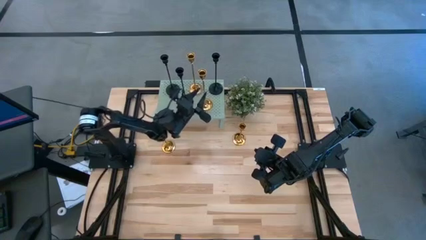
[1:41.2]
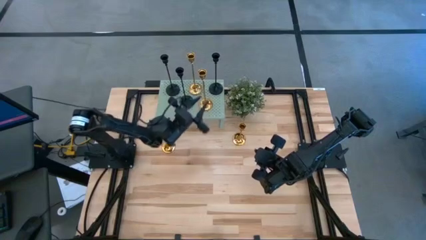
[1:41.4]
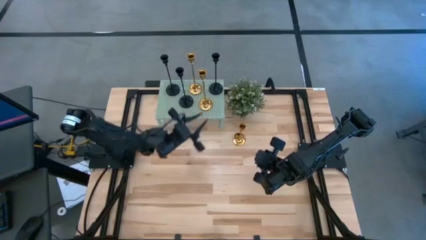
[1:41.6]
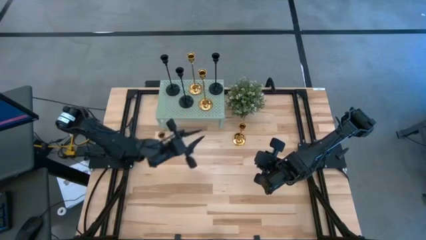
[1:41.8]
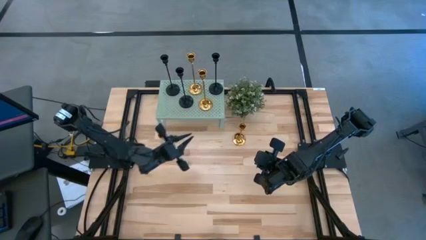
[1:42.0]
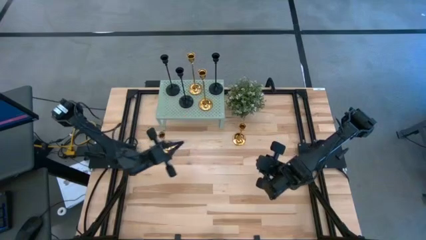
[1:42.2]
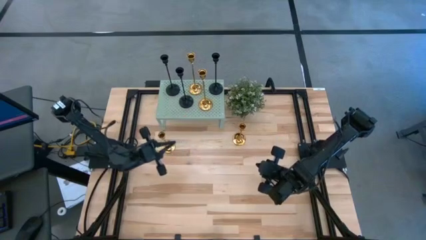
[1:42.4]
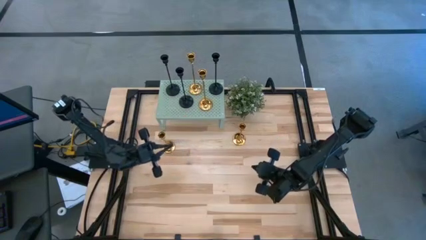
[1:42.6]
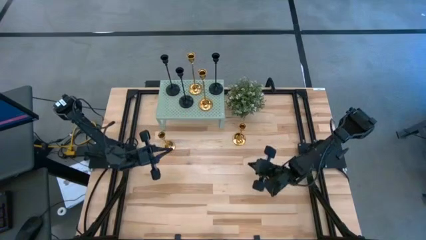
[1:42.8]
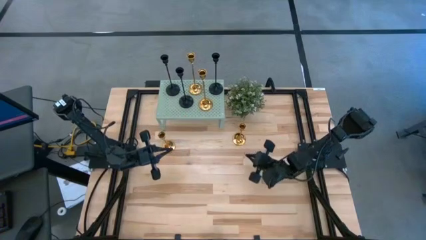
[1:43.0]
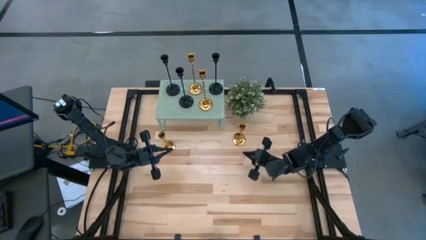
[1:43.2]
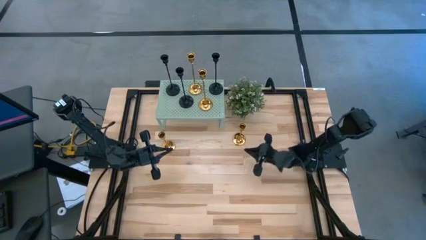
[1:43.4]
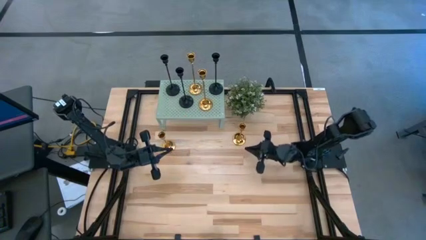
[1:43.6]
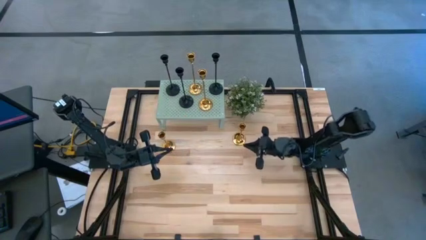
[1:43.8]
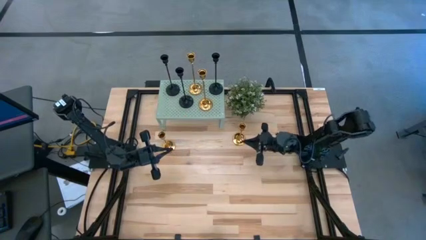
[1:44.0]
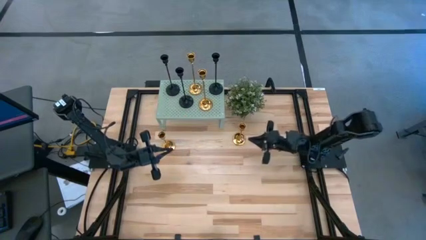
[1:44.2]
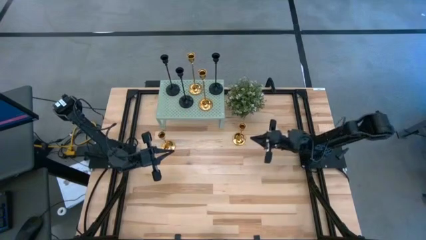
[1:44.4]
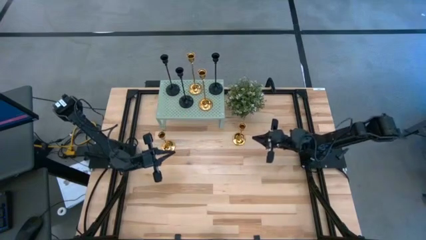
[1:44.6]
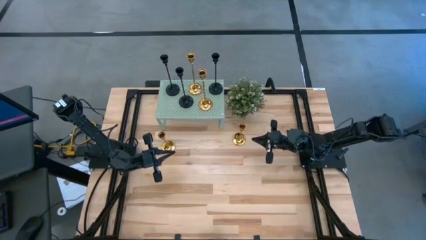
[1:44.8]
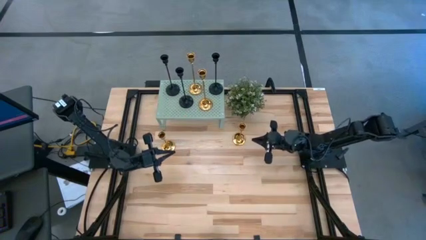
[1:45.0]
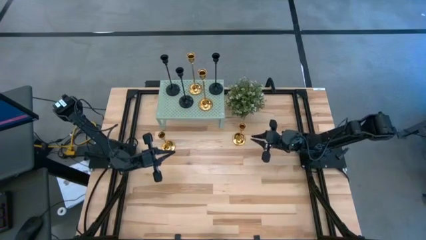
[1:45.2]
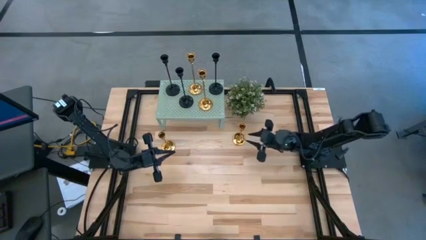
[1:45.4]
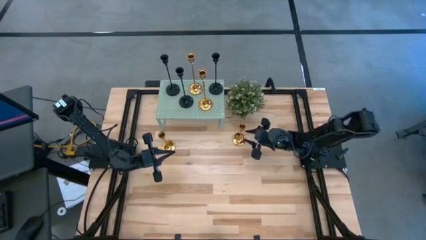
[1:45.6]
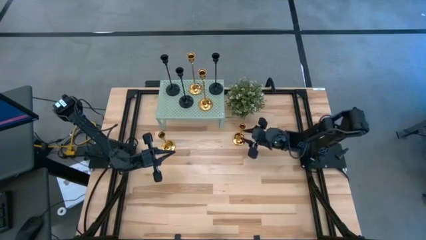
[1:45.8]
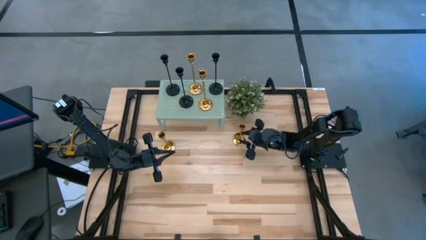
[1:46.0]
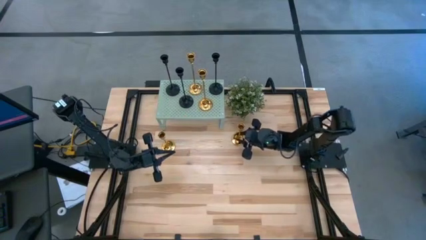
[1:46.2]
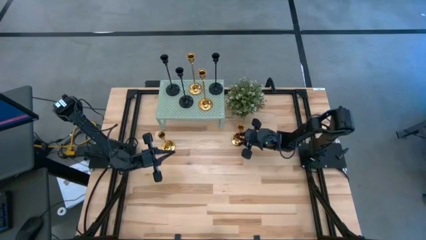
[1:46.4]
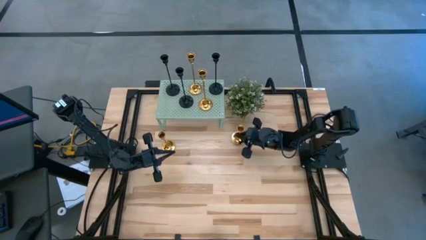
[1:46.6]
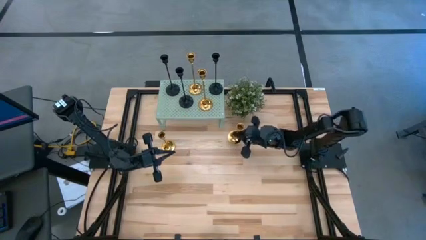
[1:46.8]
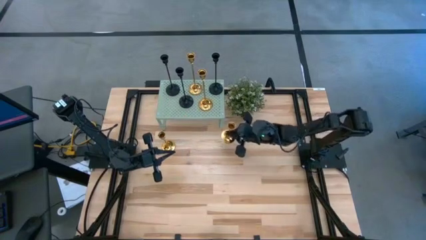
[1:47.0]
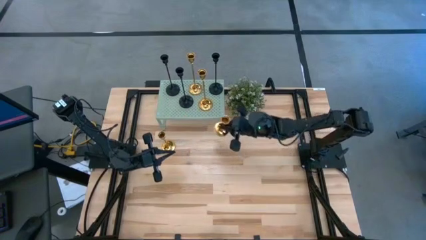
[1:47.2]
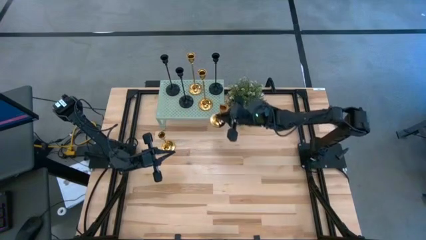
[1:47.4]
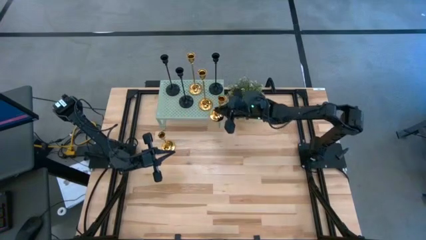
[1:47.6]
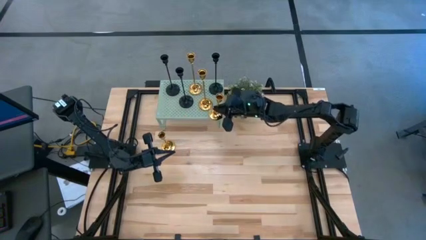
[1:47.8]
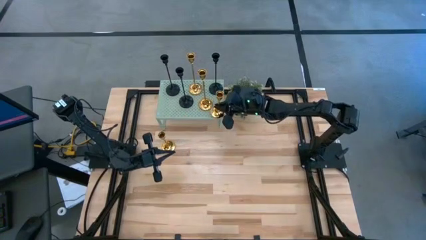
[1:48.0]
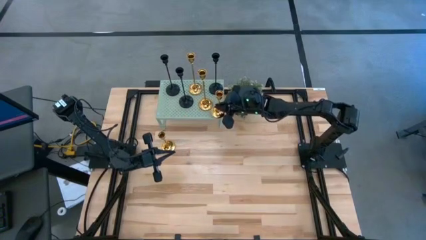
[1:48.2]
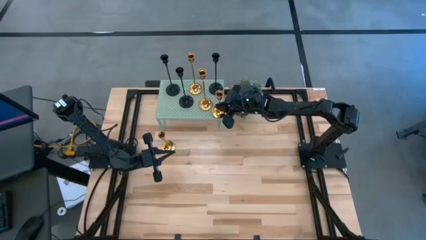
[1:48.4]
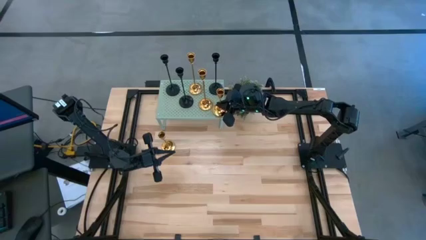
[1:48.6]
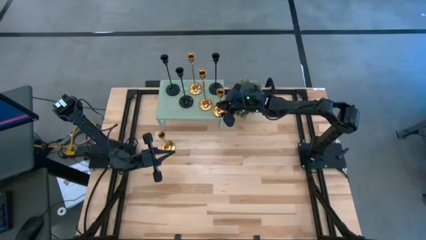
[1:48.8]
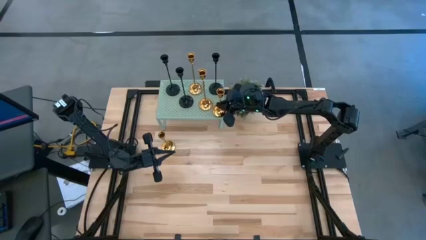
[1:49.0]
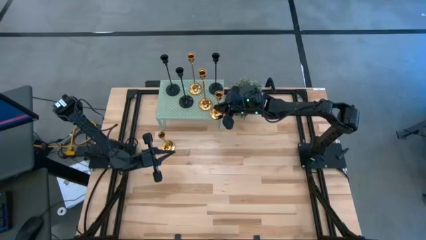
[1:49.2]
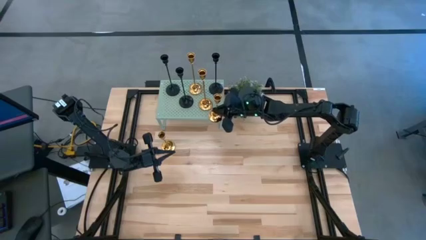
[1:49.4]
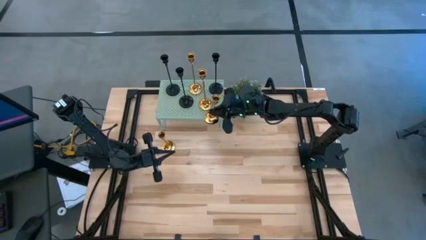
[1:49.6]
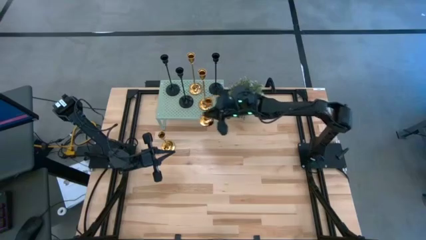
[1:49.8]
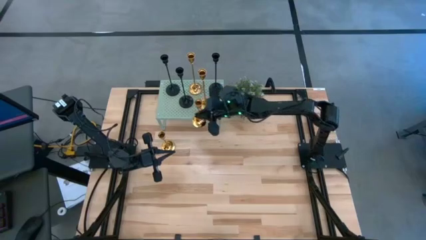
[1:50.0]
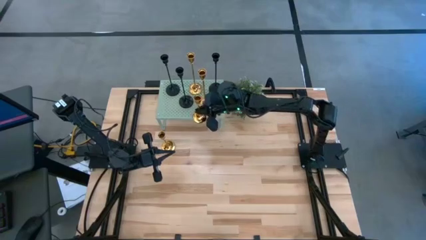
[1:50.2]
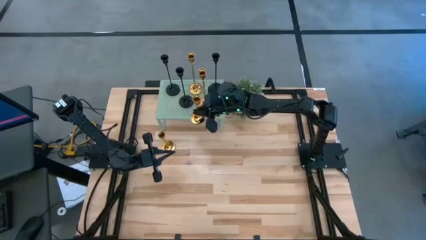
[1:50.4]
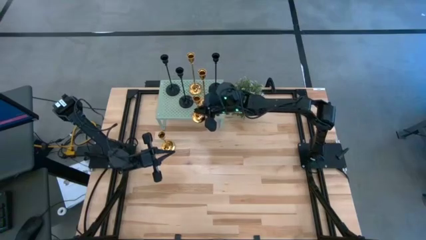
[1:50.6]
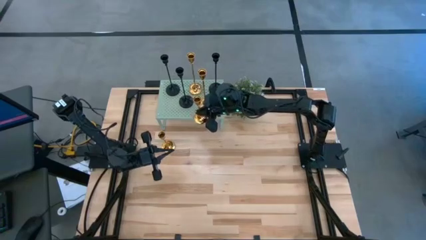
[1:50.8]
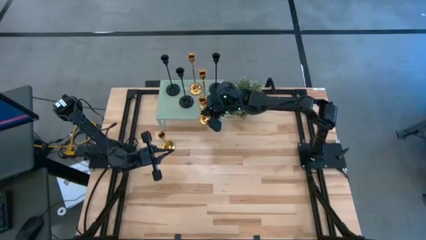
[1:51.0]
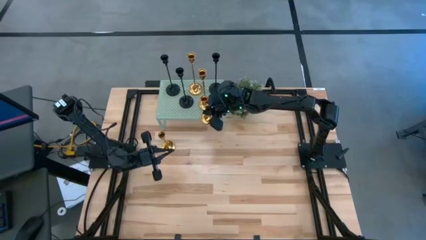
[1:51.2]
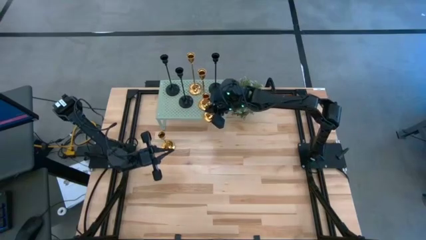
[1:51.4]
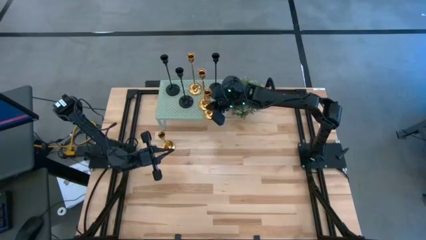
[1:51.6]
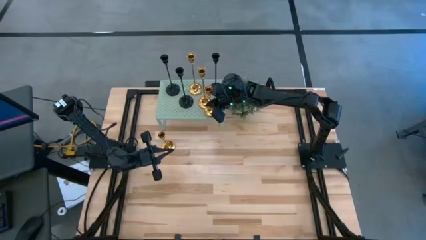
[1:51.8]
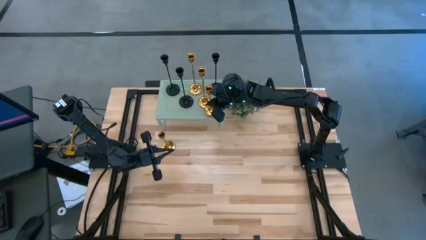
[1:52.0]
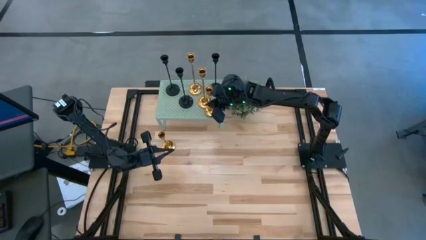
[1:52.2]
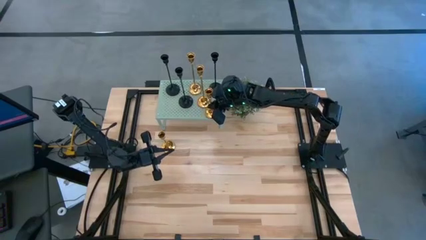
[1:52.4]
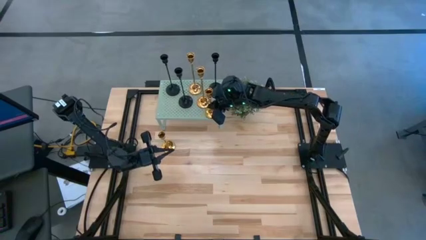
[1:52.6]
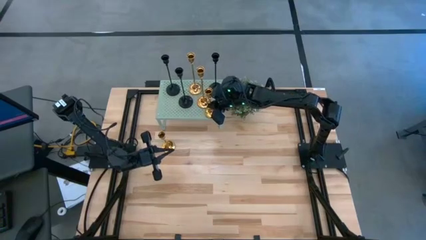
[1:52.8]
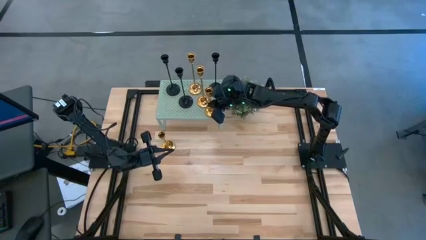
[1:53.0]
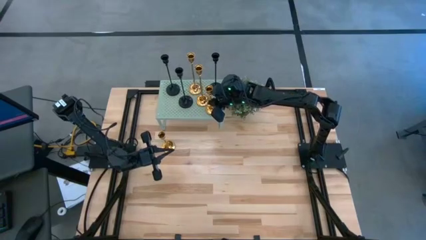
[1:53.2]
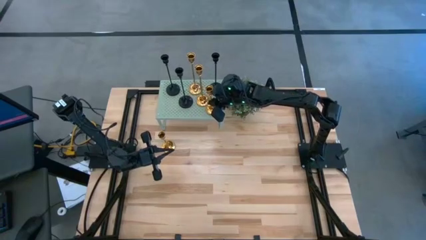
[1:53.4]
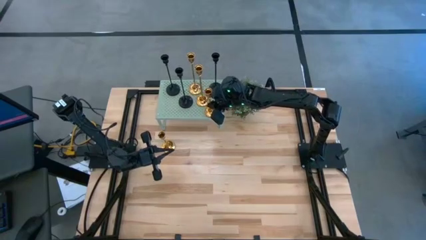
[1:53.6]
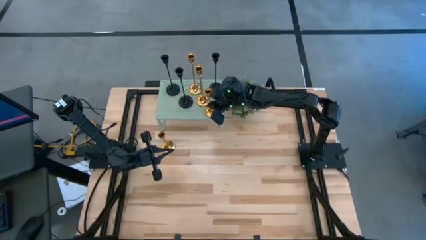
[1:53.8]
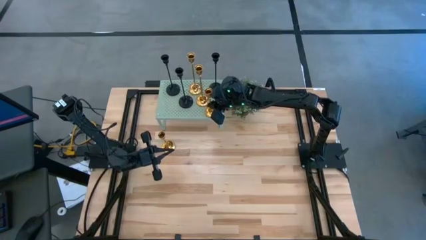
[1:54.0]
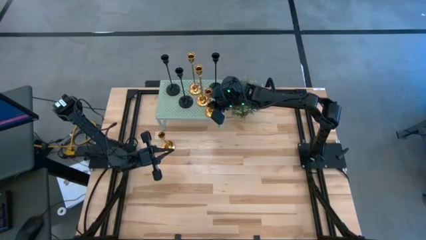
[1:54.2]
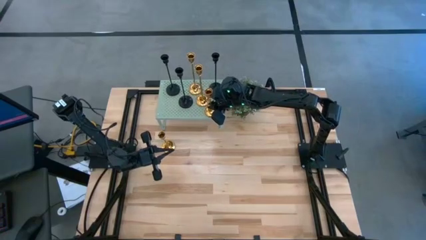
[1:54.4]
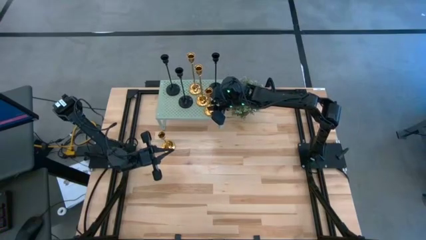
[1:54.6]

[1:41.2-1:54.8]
Task: Pick & Place candle stick holders
Put the gold candle holder on the shelf

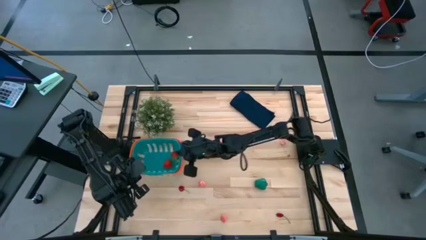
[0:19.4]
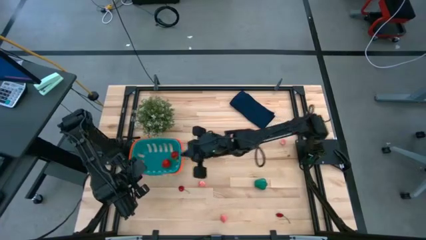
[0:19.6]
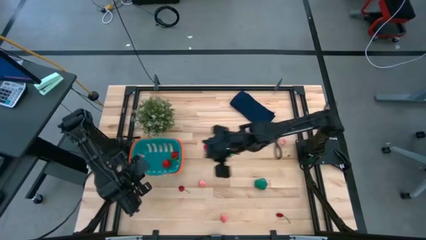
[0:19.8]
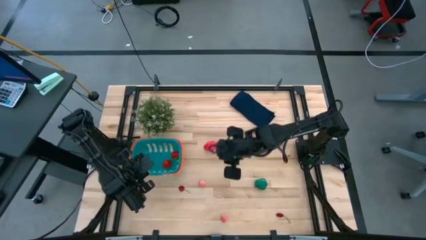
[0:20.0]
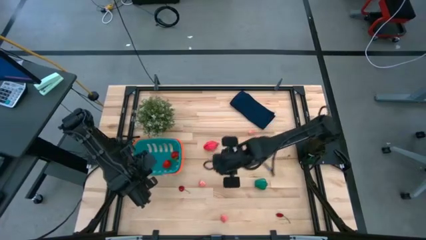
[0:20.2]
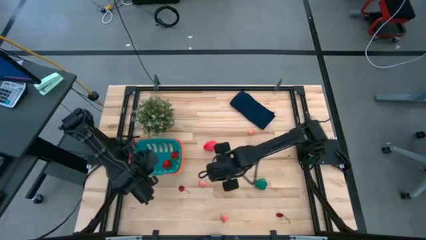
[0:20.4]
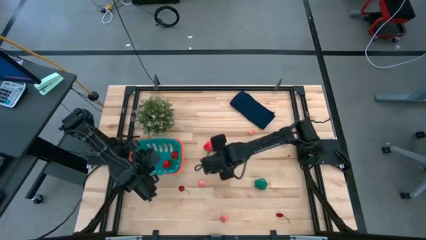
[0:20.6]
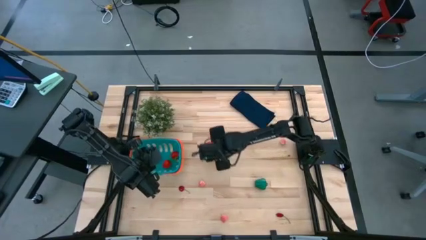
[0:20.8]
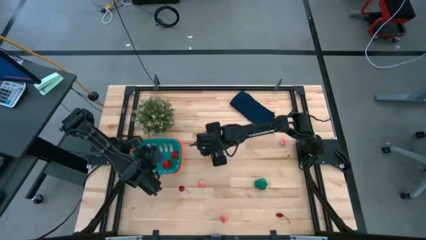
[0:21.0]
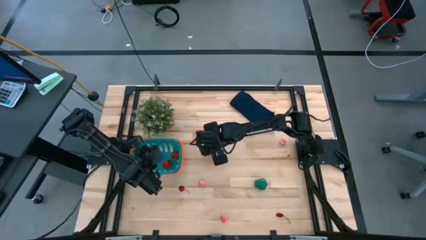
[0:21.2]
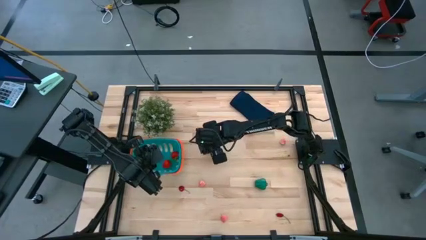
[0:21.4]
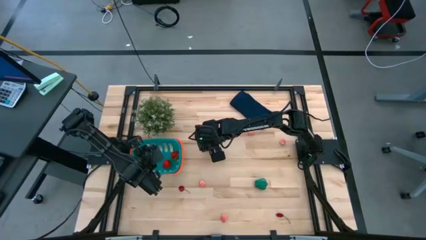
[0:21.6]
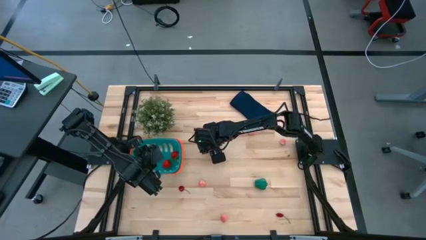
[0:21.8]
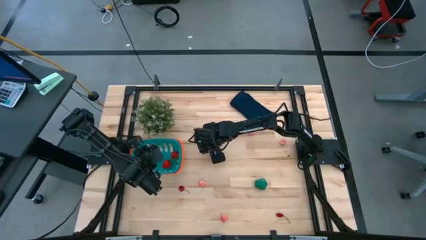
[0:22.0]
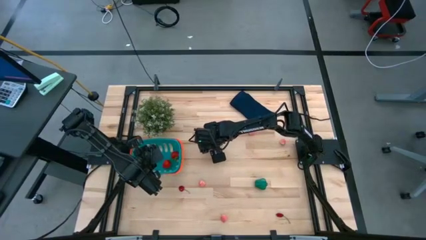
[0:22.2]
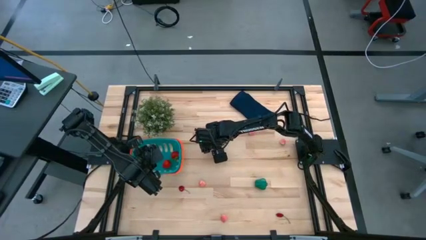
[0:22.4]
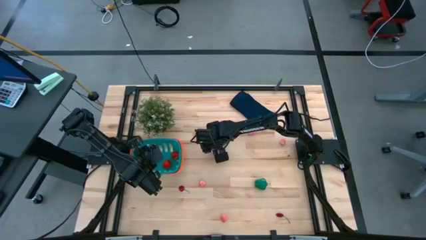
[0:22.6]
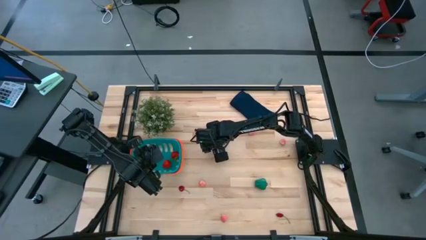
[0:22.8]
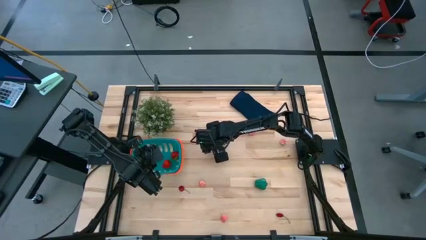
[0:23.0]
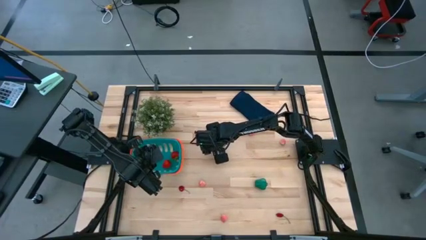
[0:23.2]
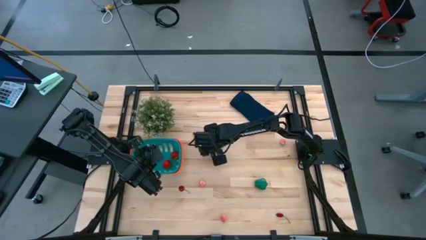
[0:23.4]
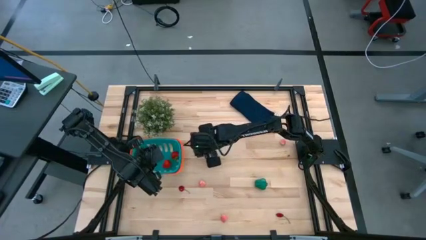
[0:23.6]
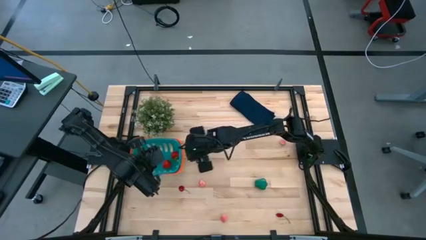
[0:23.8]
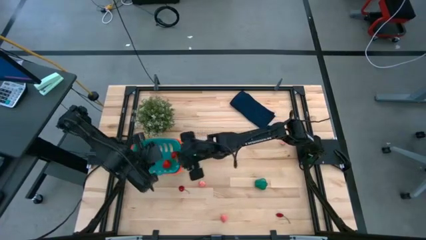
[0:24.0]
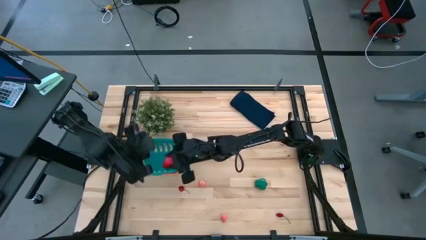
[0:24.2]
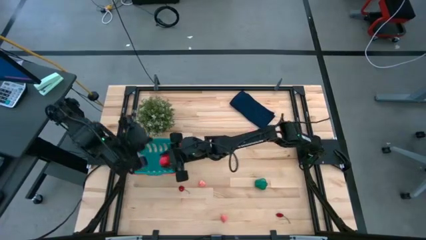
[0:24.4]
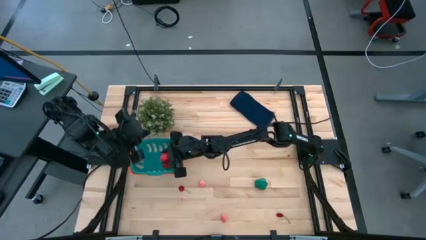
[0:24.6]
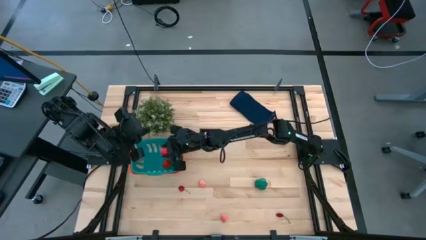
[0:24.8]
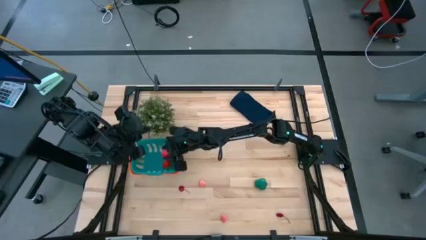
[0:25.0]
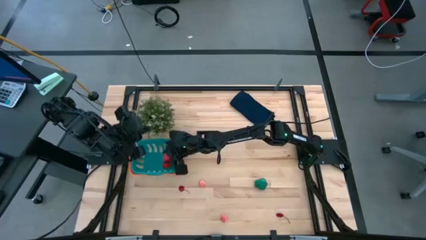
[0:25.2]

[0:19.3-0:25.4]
Task: Pick and placing Produce into tupperware
Put the dragon fruit into the green basket
